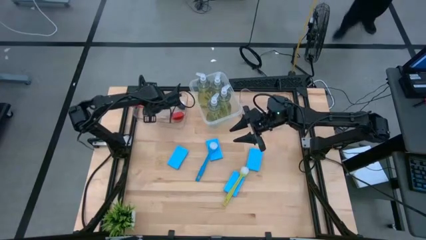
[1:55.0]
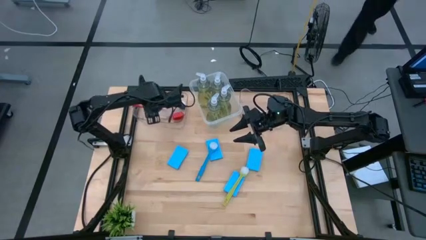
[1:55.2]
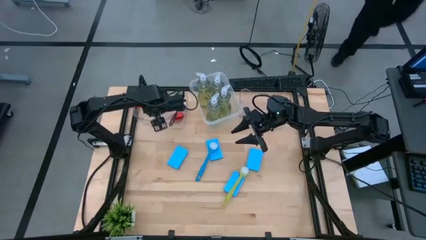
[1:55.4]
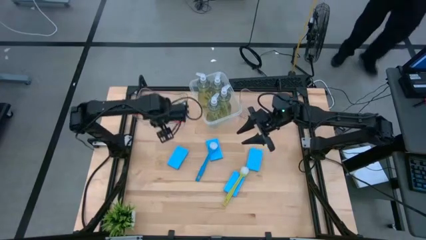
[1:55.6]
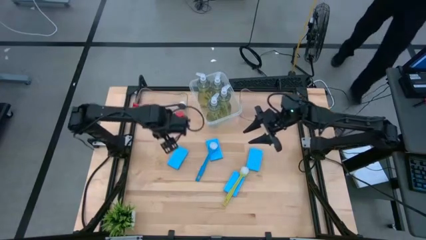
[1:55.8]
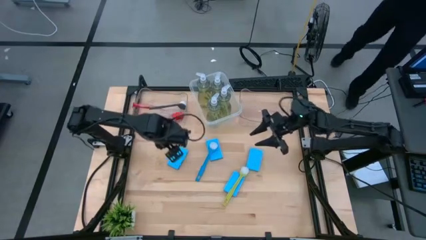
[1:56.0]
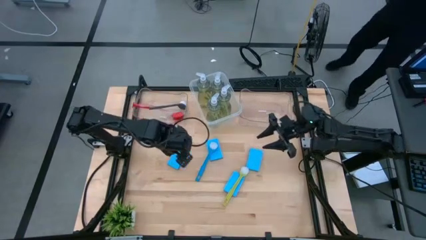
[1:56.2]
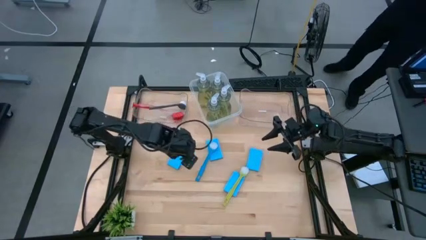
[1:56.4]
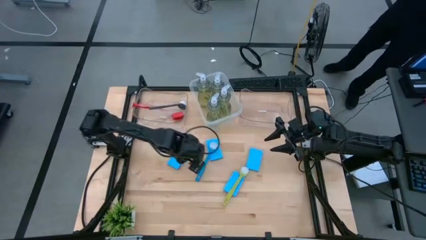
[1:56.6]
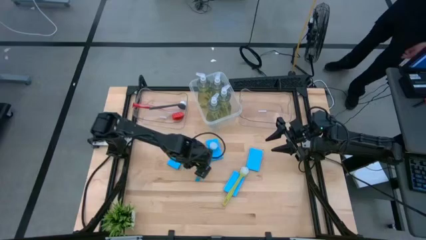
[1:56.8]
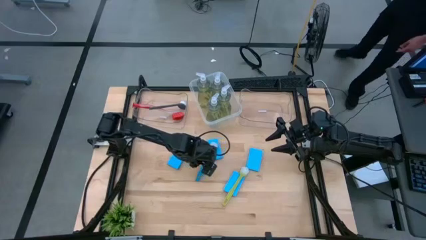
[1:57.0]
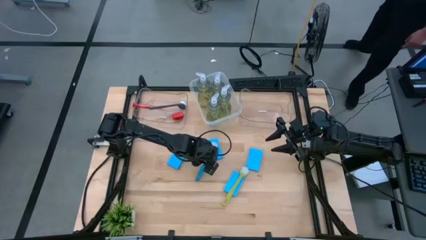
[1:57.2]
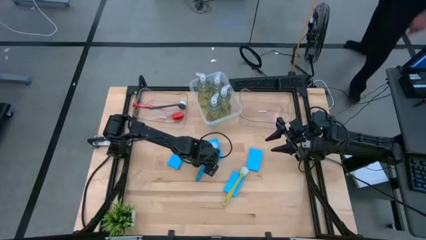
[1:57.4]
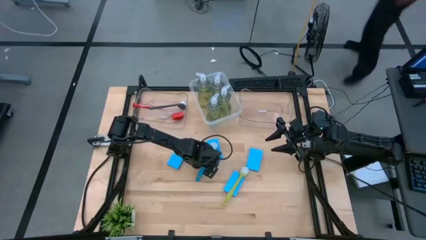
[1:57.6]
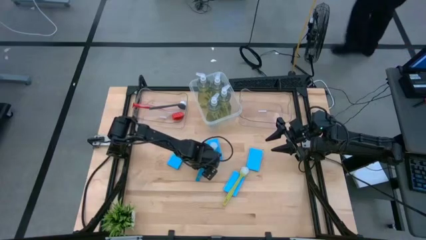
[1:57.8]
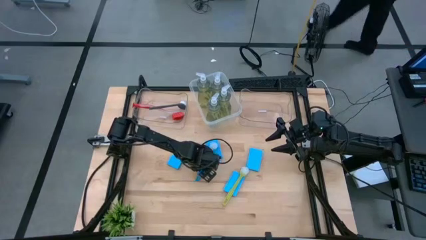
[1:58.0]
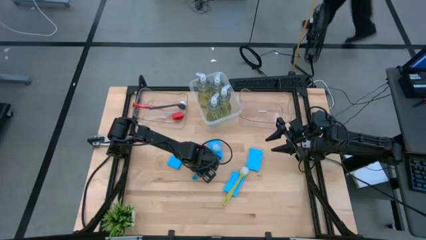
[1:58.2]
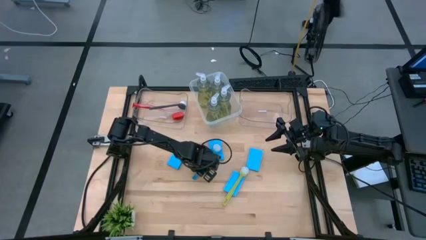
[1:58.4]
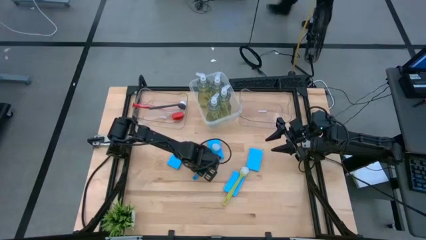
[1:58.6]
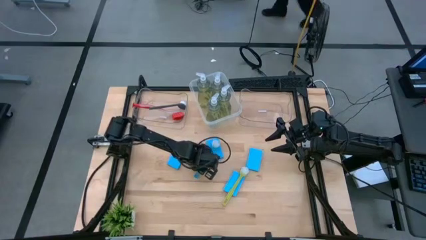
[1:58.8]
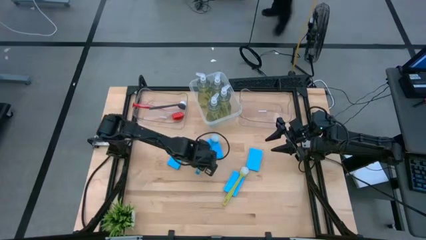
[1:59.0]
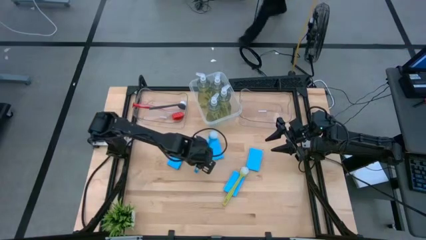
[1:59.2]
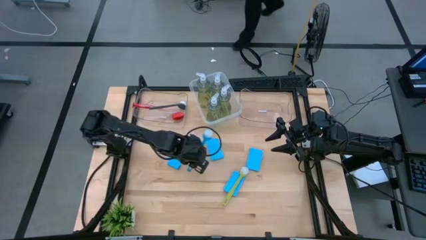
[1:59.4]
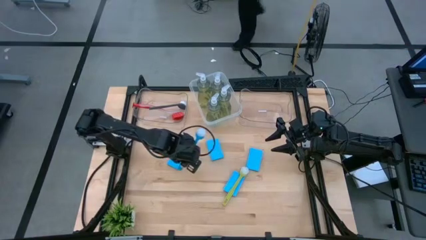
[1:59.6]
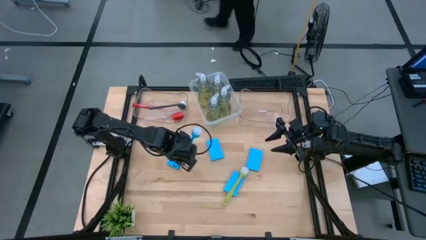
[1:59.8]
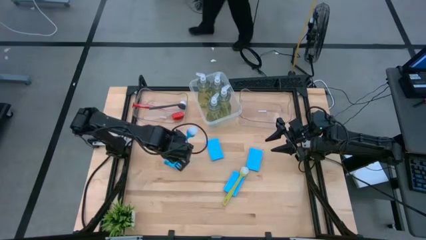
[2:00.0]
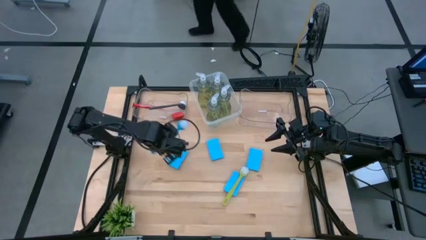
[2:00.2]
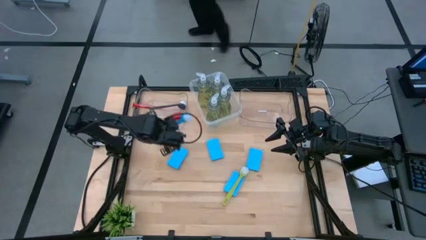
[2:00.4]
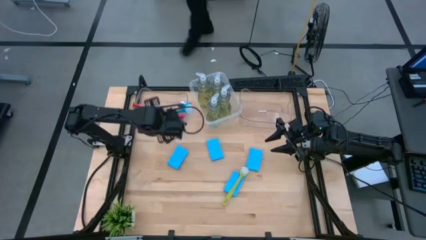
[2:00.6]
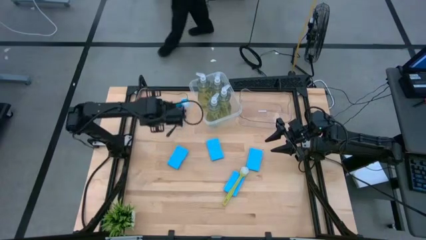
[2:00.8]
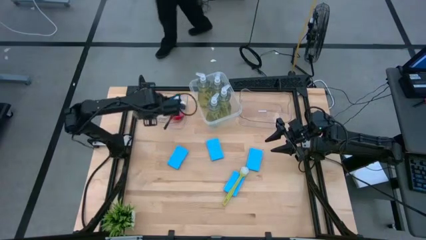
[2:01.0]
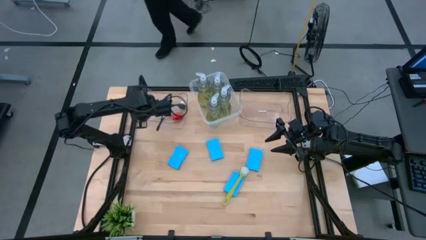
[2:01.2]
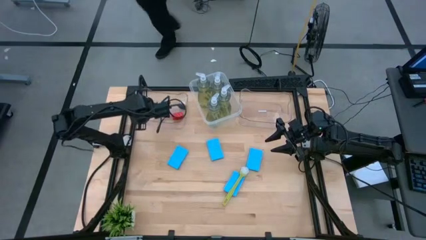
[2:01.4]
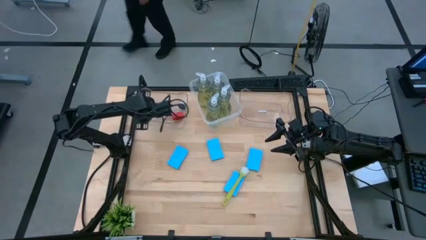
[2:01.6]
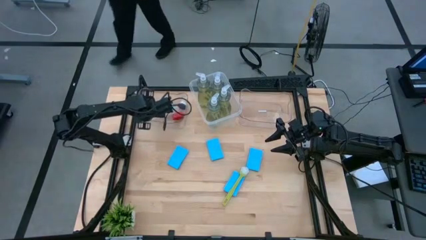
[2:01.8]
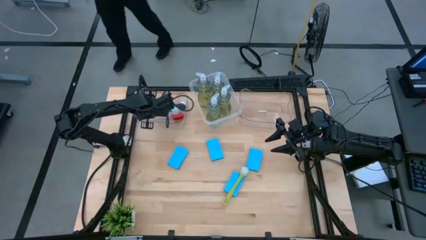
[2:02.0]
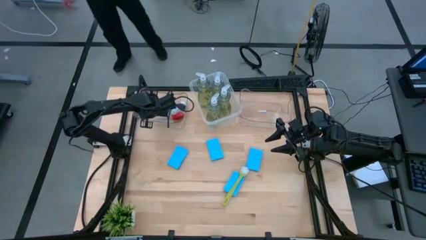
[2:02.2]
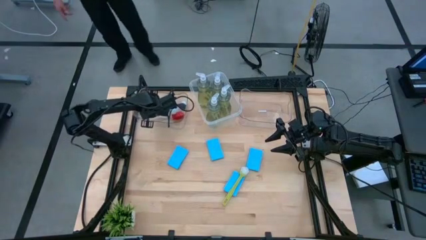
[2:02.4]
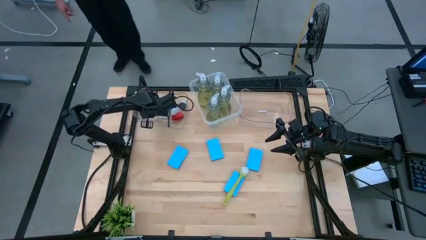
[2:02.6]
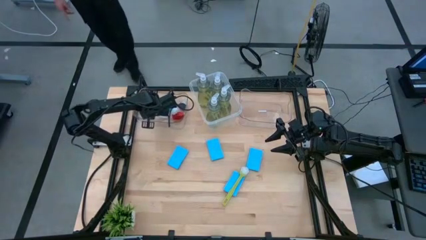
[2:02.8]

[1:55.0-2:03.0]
Task: Pick & Place Kitchen Sink Supplies
Put the blue cleaning brush into the left transparent bin

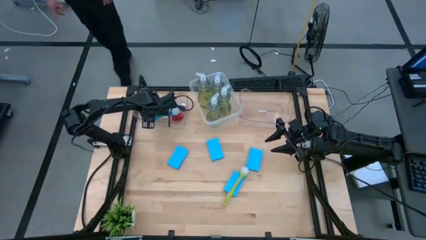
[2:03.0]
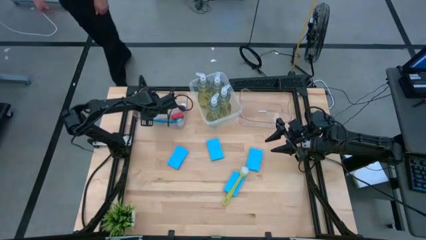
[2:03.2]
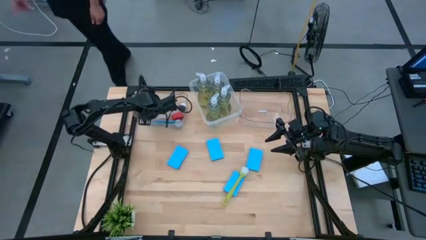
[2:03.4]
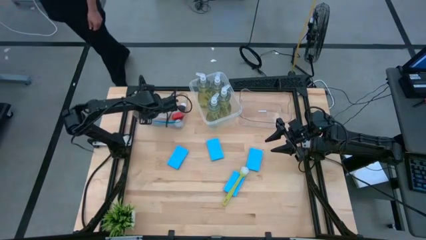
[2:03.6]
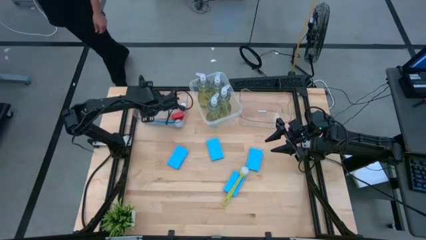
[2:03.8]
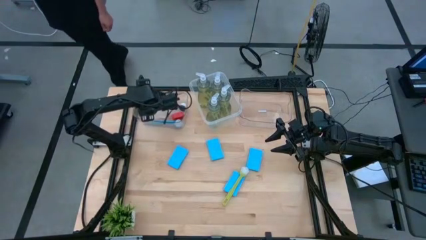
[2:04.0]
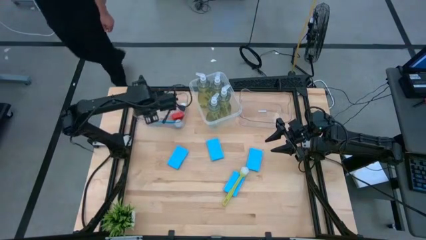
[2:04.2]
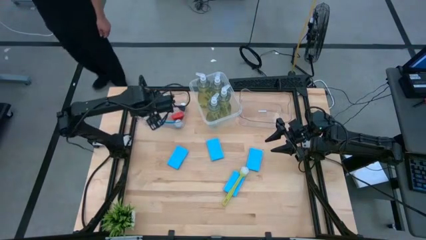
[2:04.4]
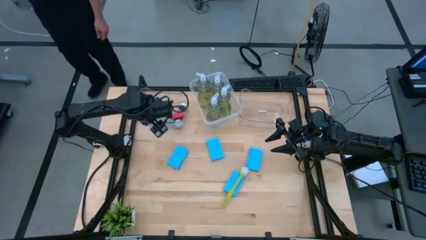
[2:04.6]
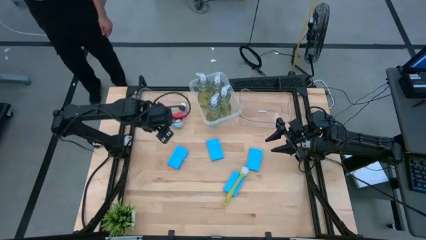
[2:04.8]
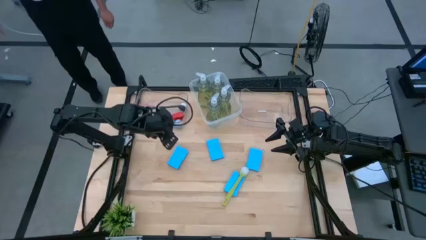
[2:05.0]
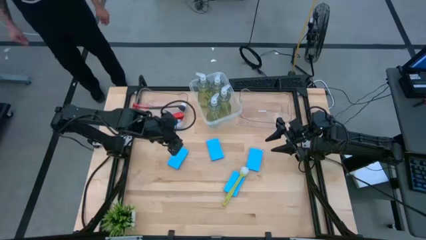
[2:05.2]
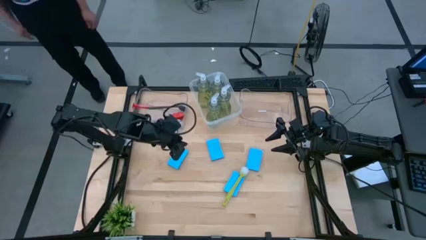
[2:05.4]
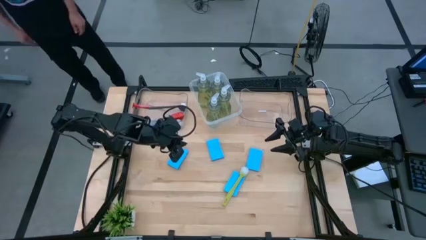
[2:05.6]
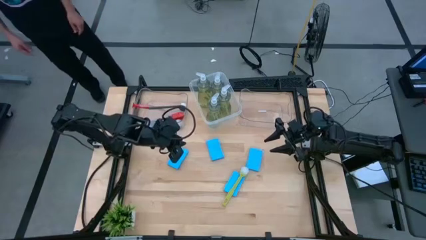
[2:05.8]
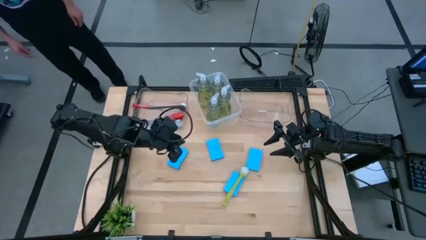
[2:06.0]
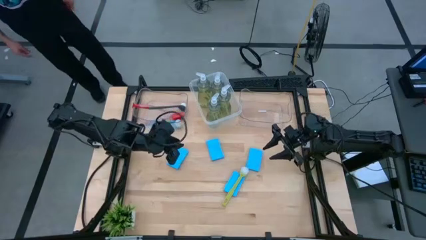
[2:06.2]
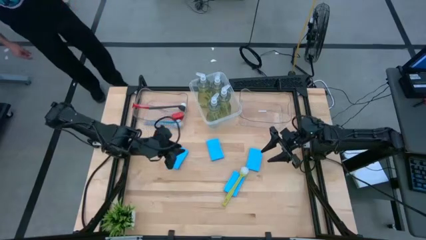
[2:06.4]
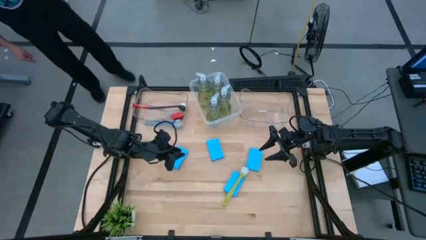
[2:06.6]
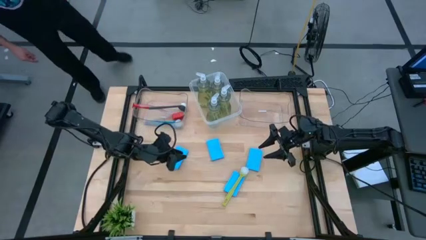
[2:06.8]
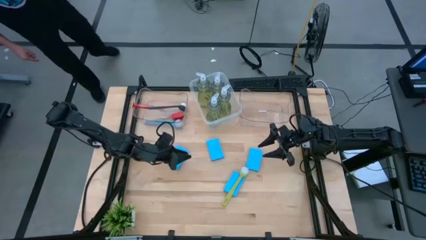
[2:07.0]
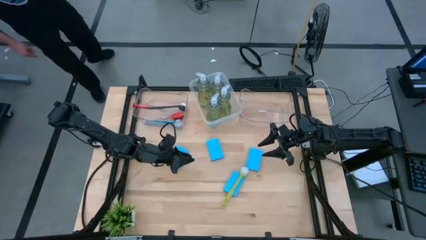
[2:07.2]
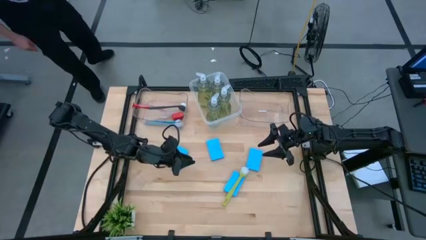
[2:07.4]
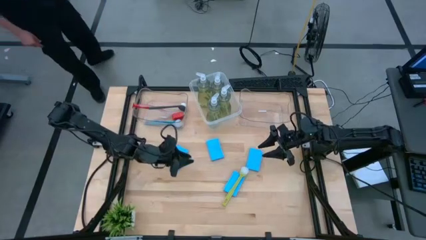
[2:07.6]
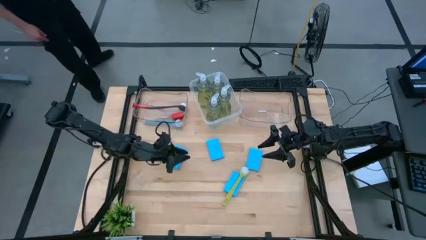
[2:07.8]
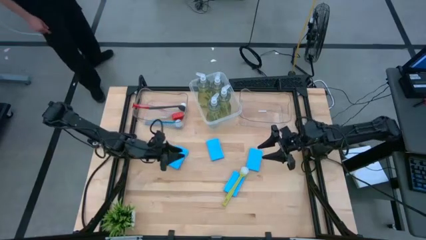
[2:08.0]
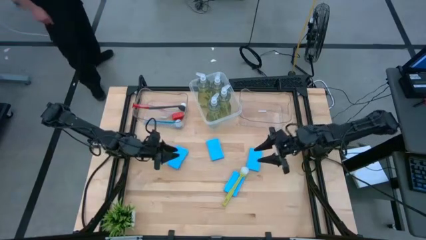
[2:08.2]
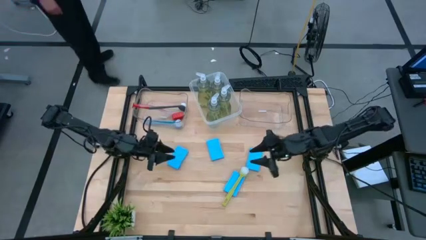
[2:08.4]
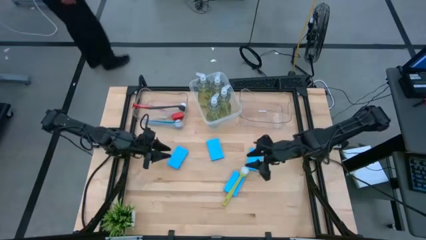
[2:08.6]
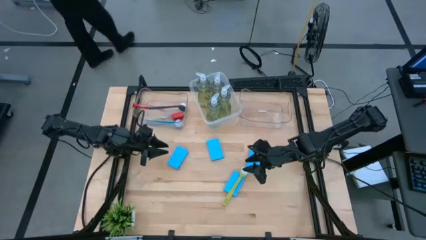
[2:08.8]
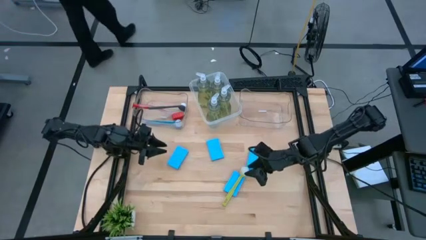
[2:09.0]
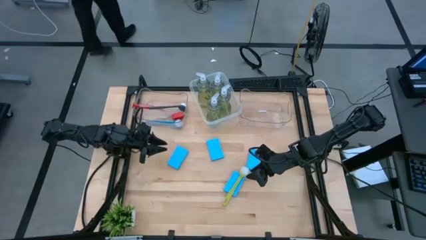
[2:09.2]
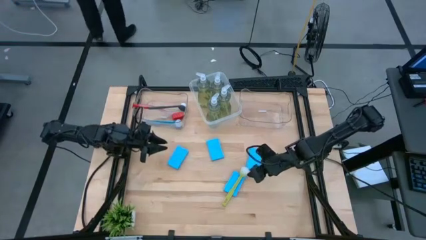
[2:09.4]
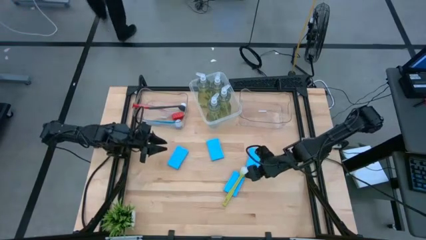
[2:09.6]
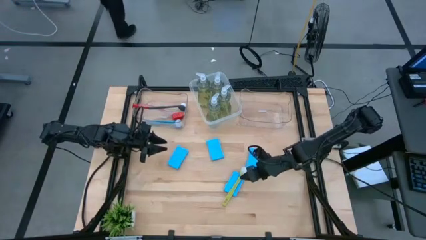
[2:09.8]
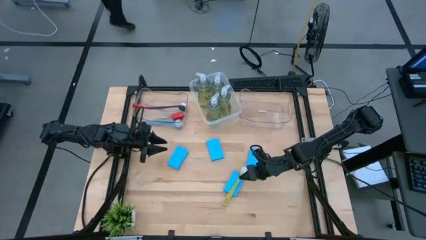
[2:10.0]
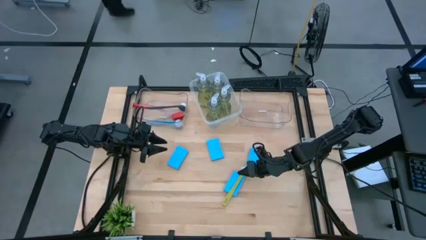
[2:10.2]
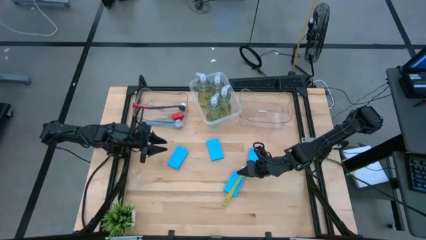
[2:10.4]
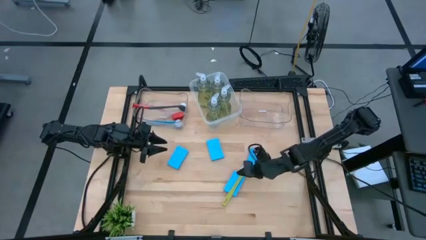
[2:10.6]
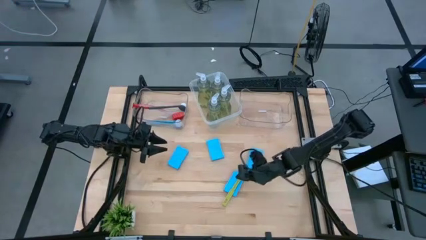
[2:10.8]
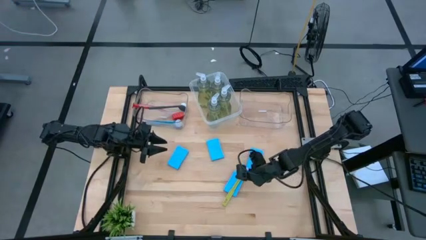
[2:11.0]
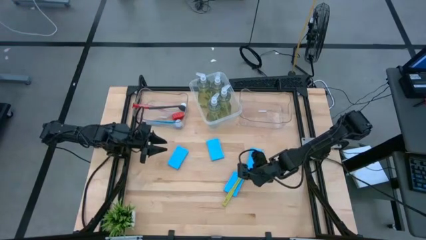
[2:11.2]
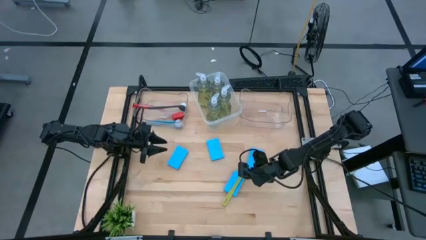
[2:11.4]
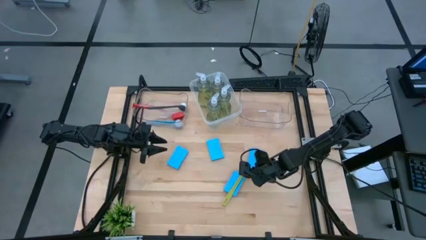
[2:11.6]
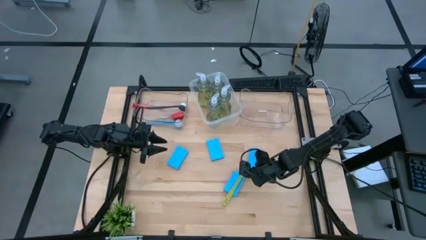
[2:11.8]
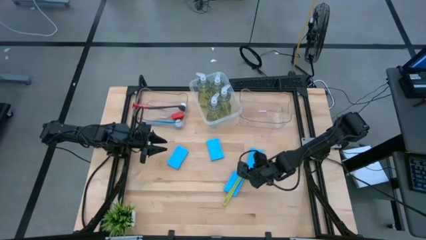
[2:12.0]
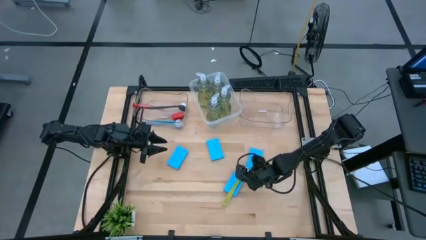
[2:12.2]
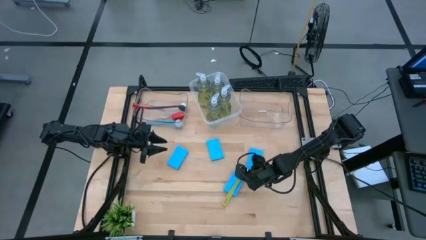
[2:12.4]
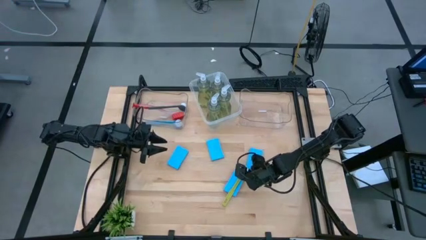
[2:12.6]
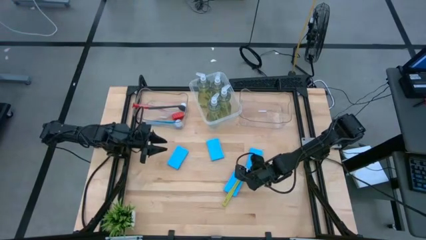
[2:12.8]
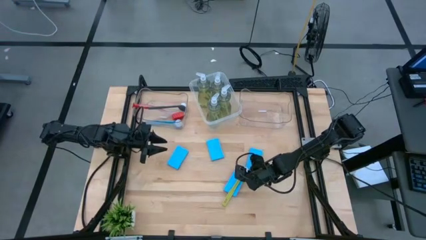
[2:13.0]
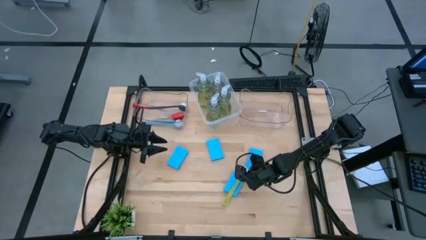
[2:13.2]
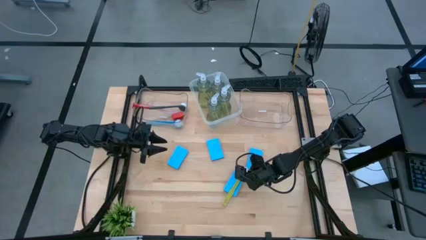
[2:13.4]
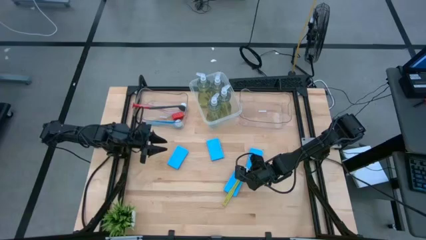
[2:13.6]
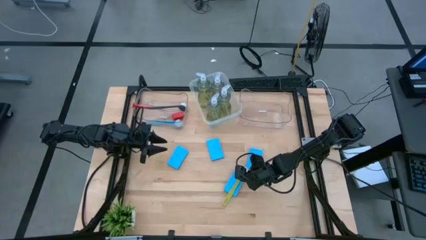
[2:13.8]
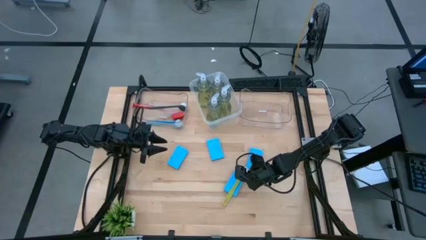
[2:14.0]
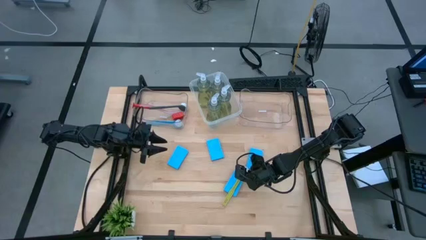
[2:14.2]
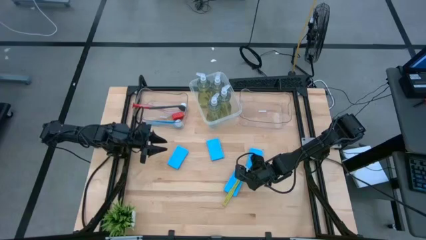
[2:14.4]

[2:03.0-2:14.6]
Put the green cleaning brush into the left transparent bin
